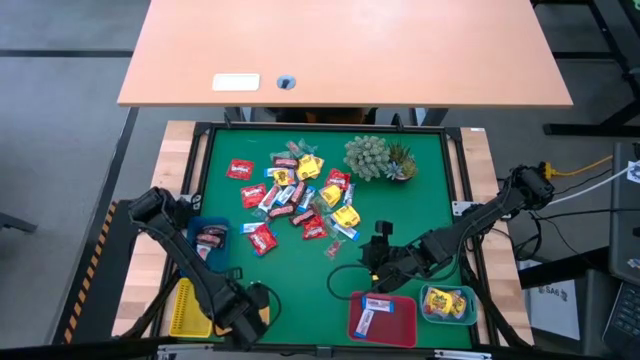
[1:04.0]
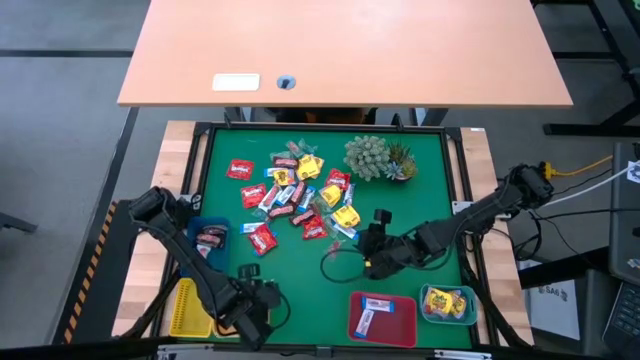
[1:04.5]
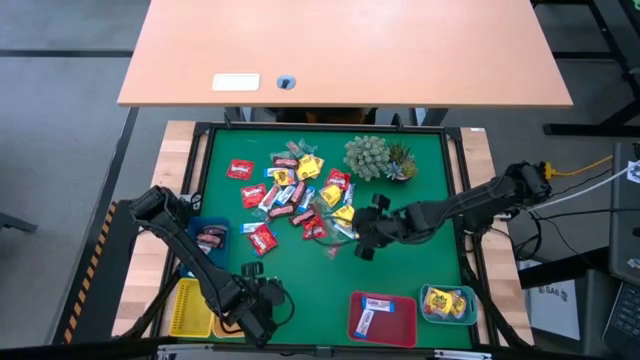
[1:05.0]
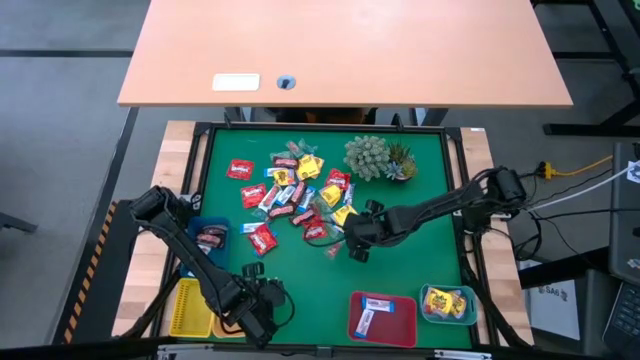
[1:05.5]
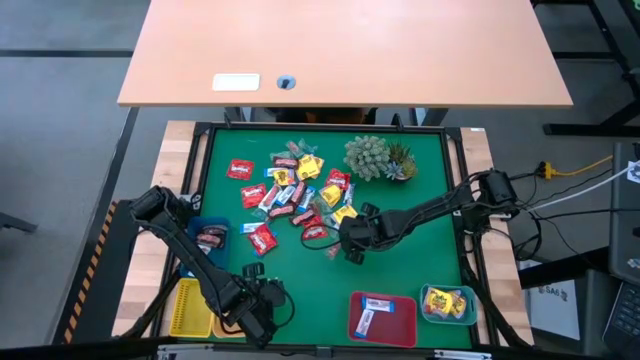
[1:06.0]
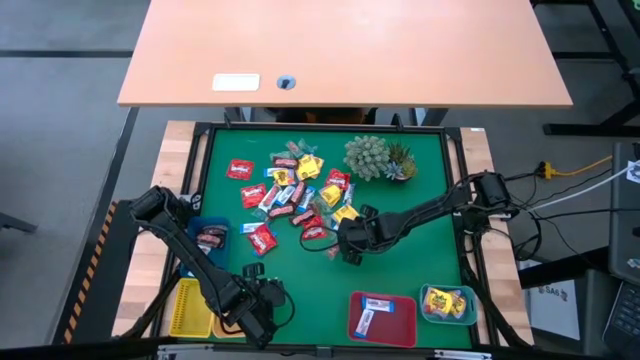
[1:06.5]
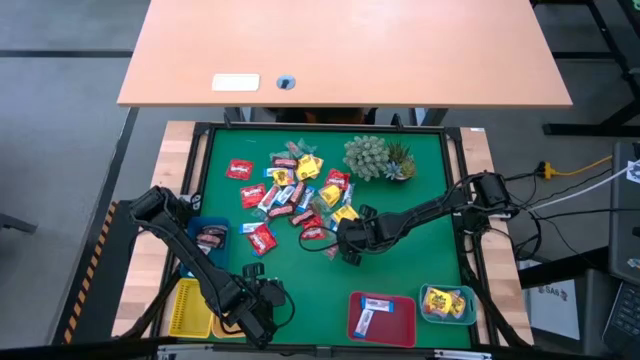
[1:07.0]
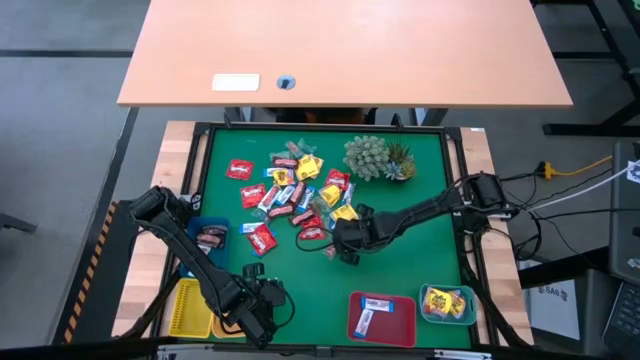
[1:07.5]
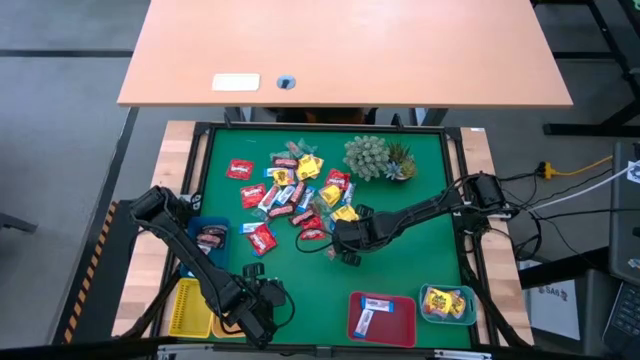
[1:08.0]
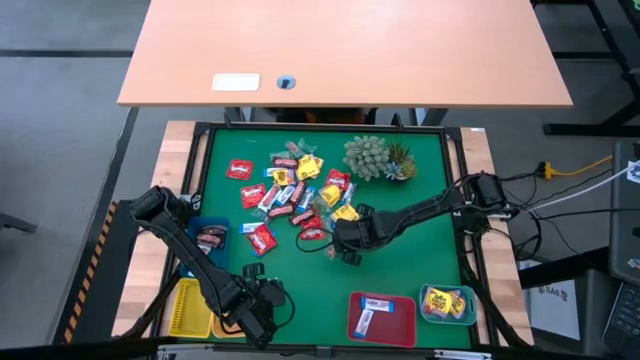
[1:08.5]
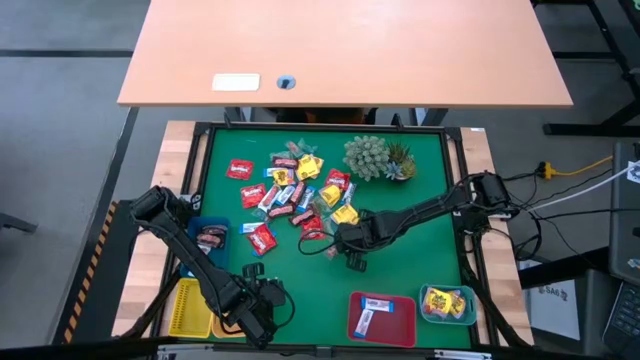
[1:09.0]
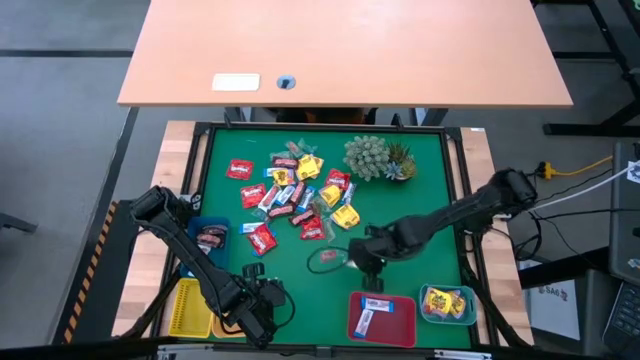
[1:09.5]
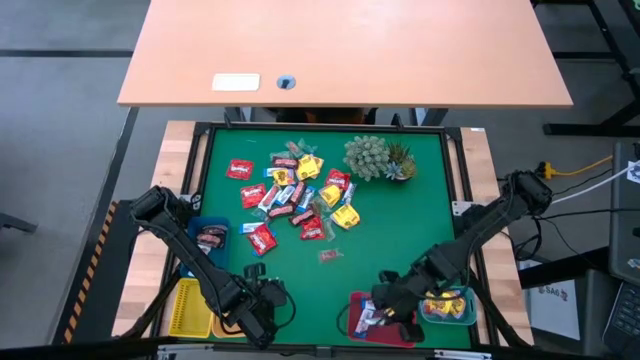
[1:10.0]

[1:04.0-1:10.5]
Task: Sort candy
Put the blue chocolate into the red bin

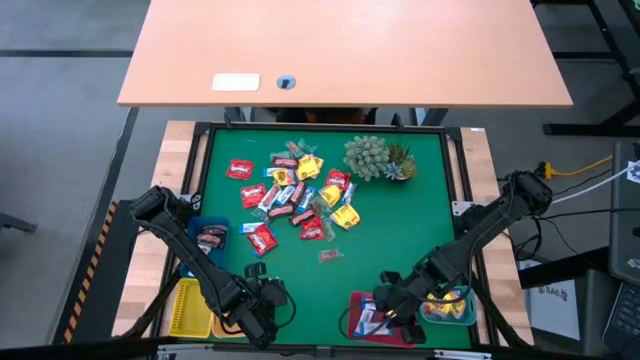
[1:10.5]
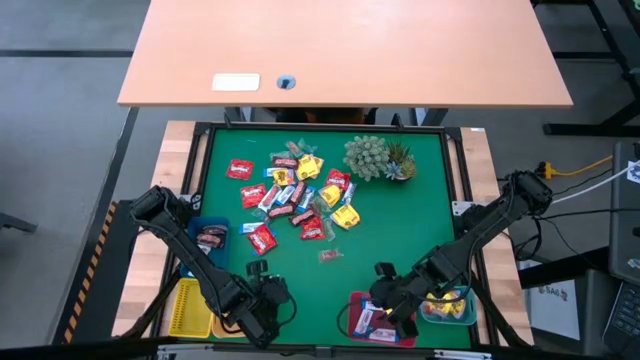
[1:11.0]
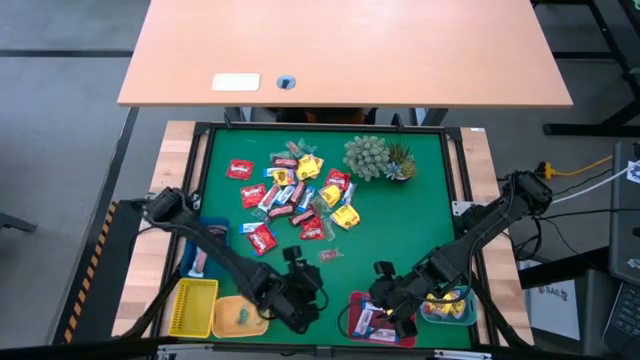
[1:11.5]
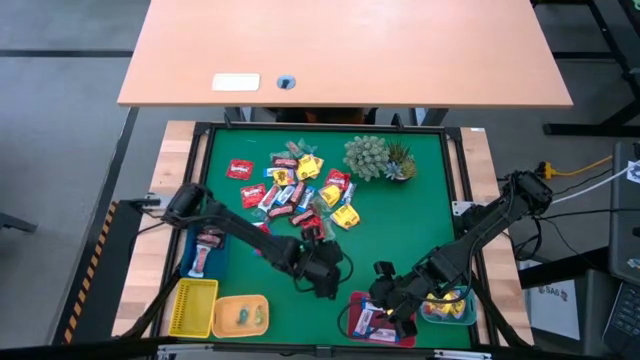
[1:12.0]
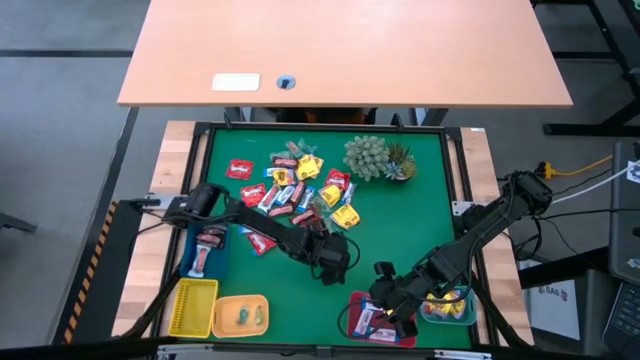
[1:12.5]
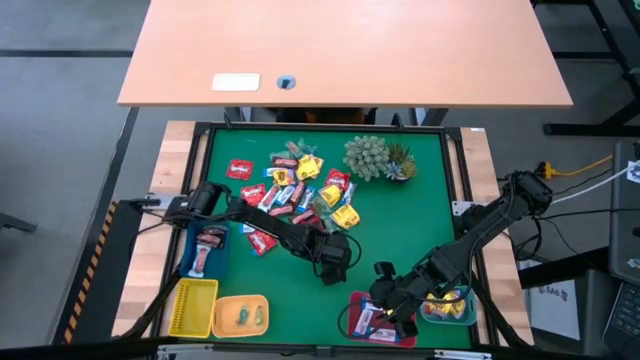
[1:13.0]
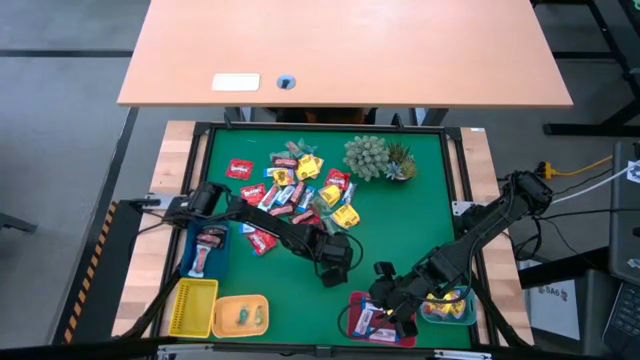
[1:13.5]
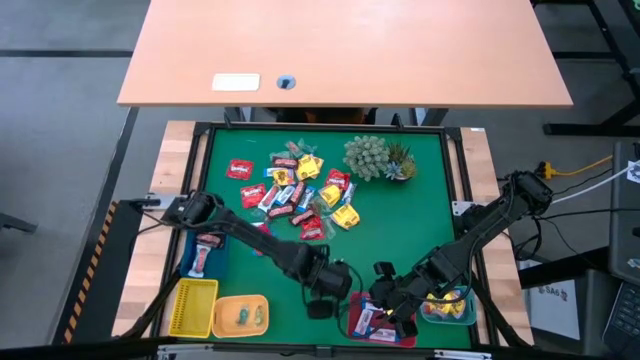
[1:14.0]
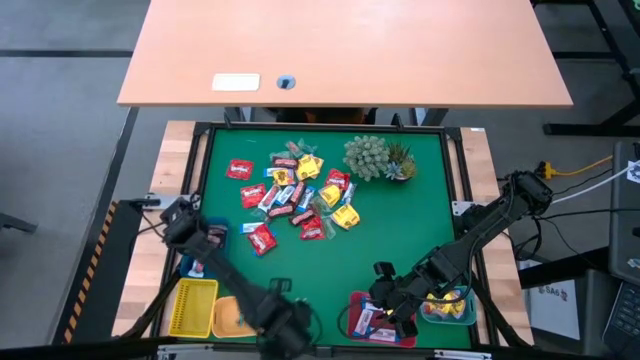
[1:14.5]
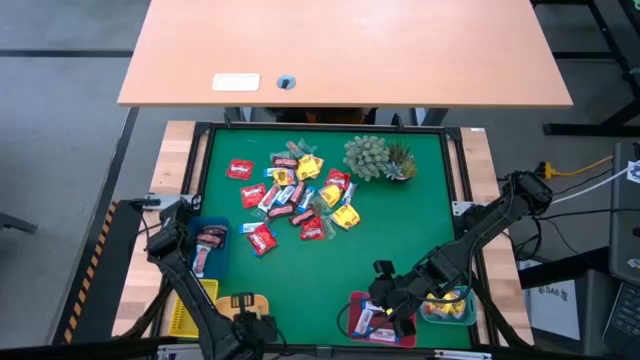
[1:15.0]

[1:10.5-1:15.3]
Put the transparent candy into the orange bin

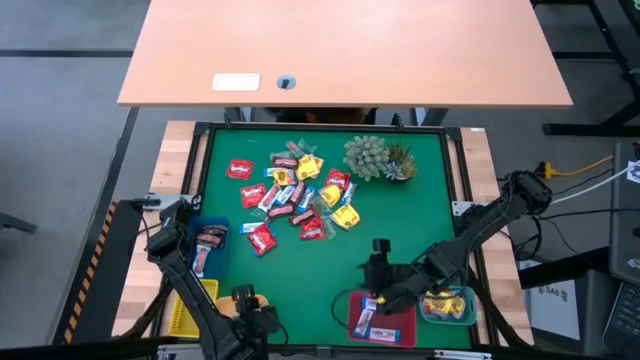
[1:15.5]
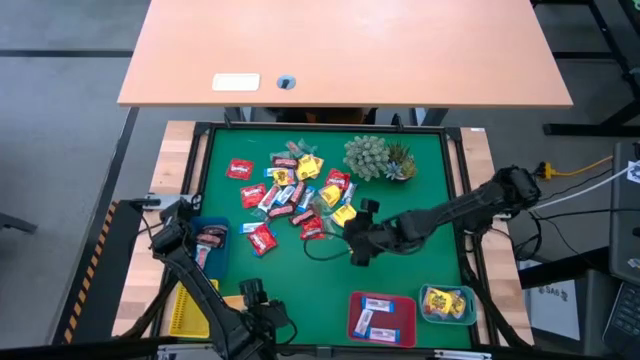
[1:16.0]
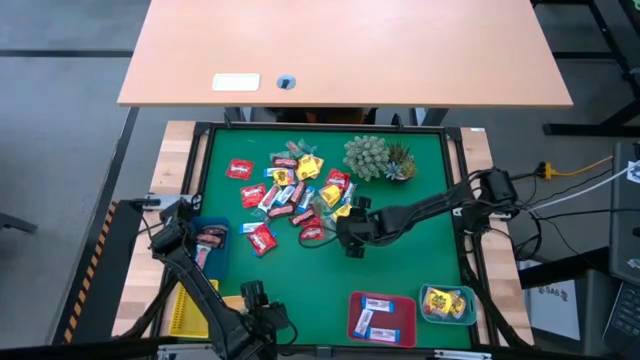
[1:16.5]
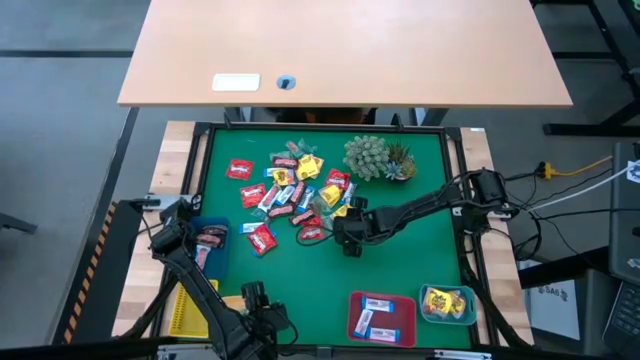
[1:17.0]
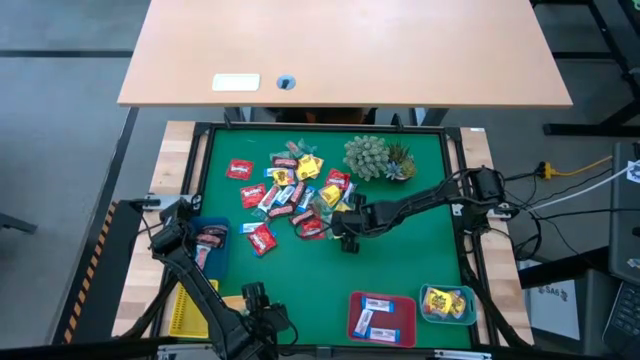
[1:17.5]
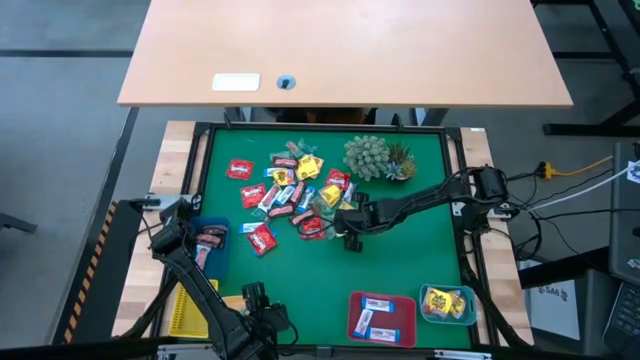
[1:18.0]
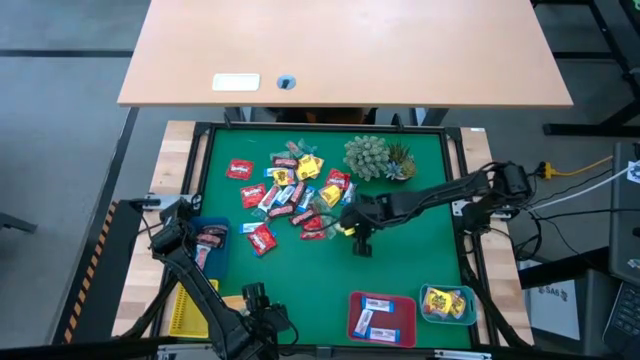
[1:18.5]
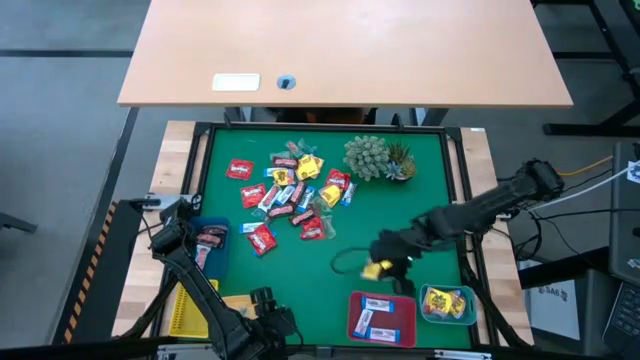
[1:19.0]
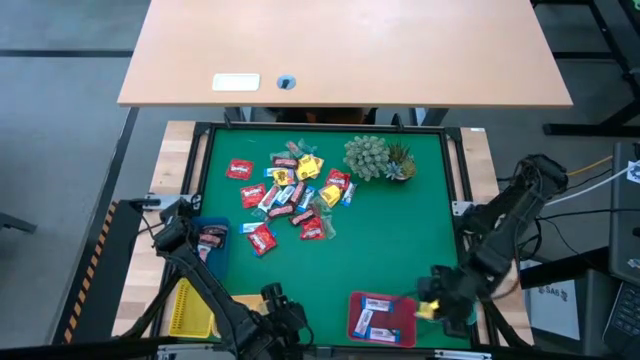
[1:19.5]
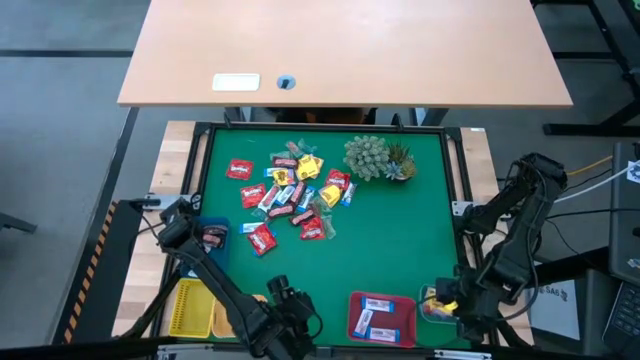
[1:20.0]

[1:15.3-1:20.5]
Put the yellow candy into the green bin

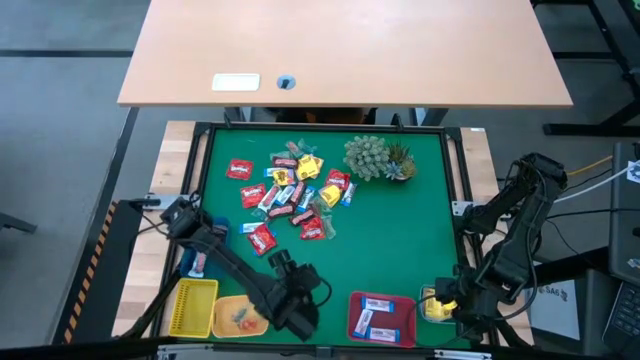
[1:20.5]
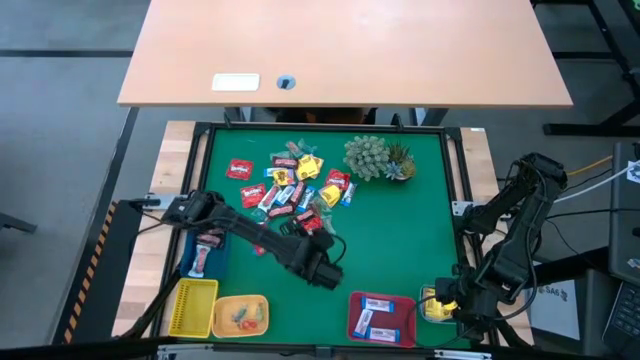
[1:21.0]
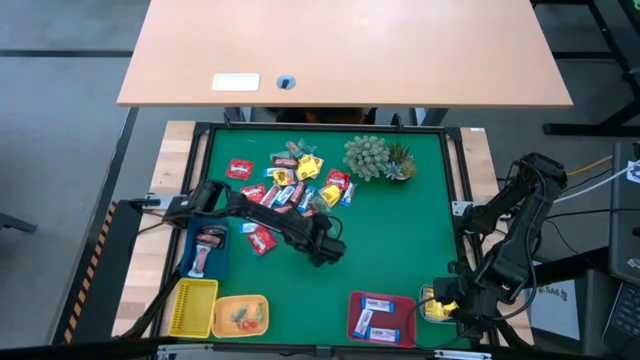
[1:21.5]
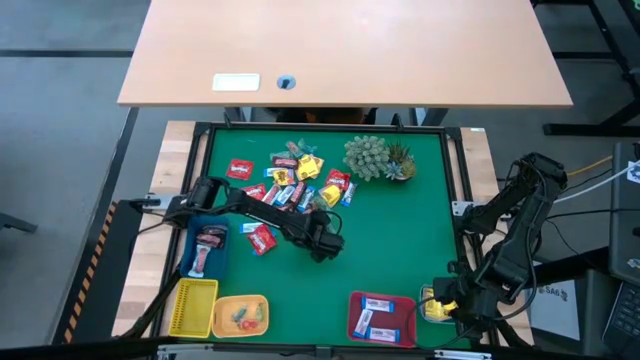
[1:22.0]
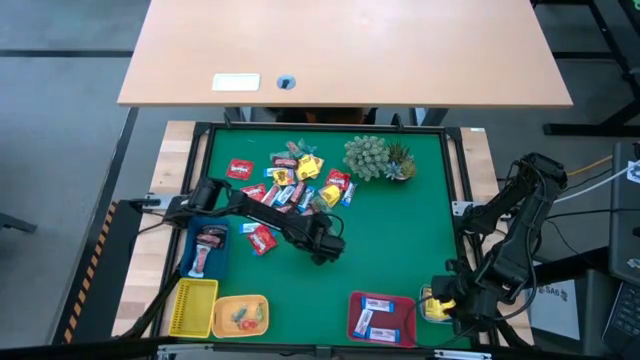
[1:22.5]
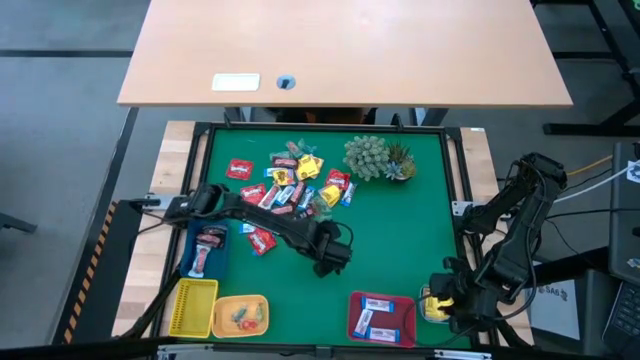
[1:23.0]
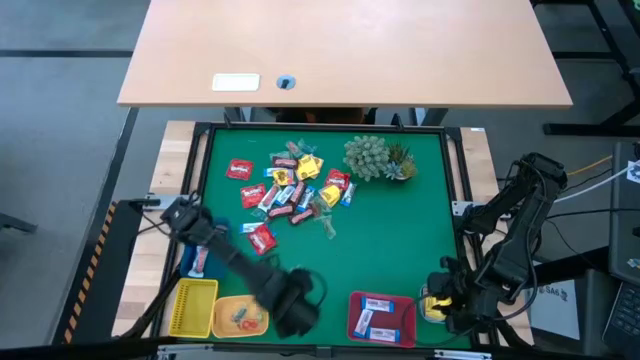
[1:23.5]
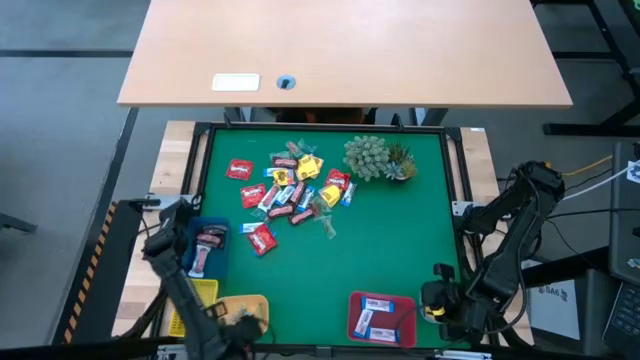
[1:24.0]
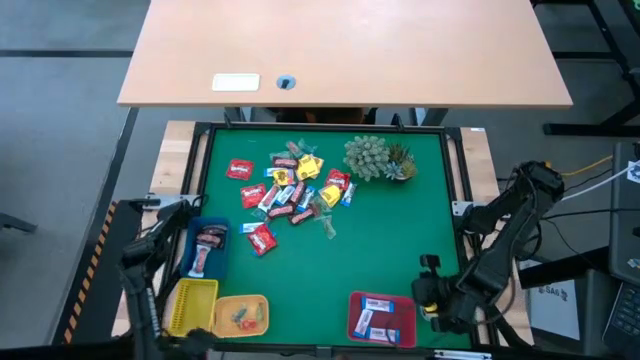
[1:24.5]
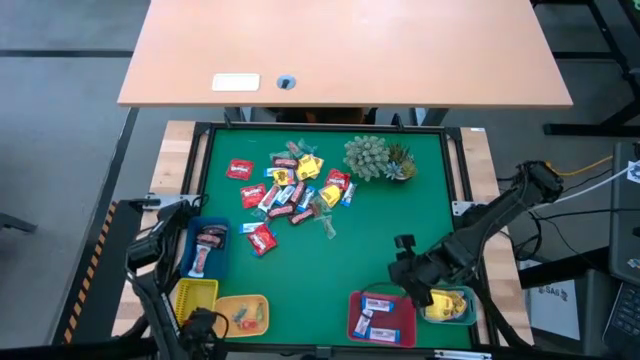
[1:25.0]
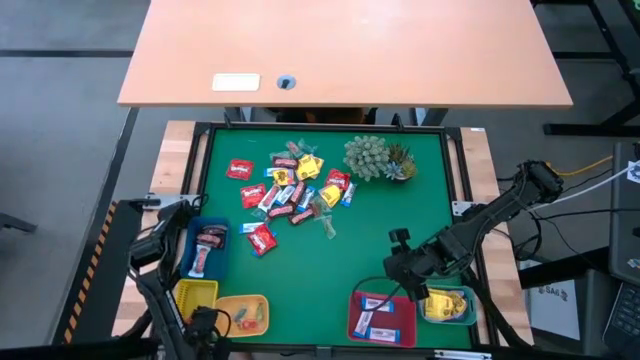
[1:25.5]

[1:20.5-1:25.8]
Put the red candy into the yellow bin
